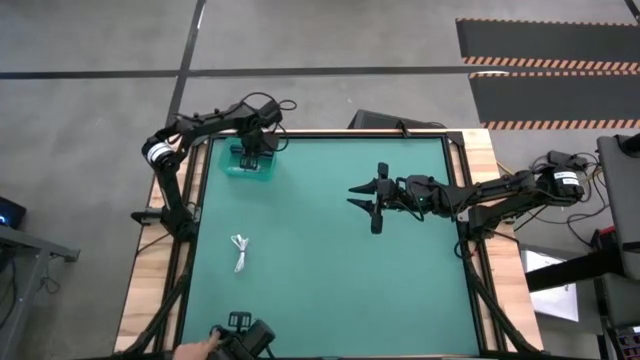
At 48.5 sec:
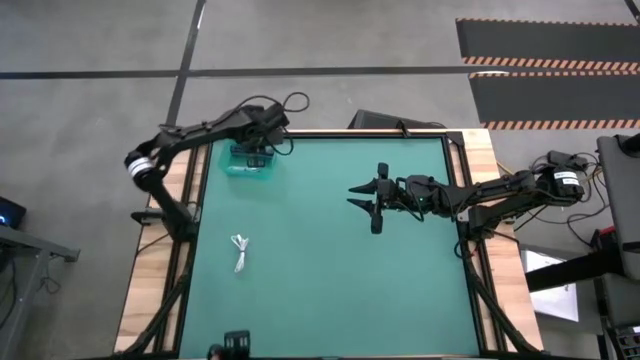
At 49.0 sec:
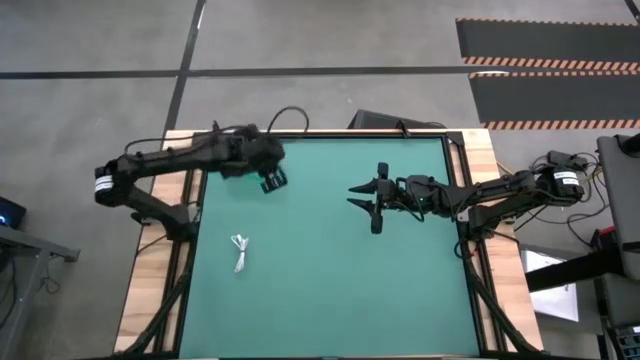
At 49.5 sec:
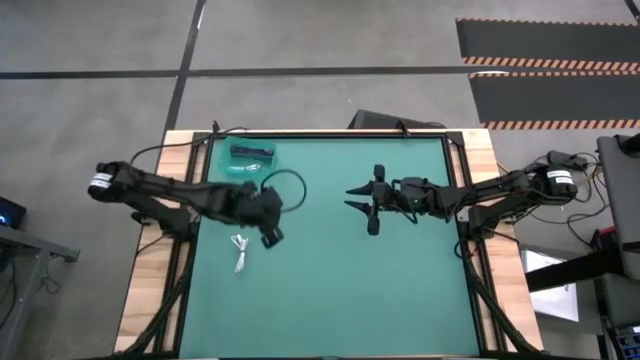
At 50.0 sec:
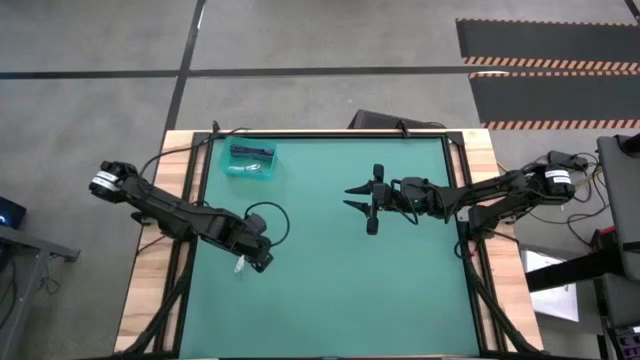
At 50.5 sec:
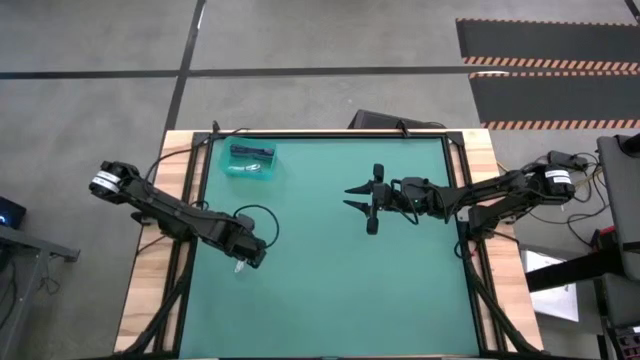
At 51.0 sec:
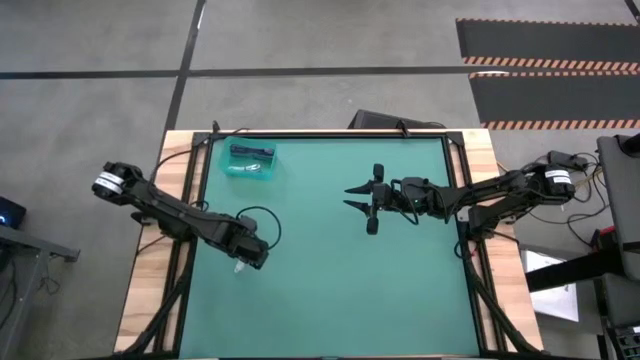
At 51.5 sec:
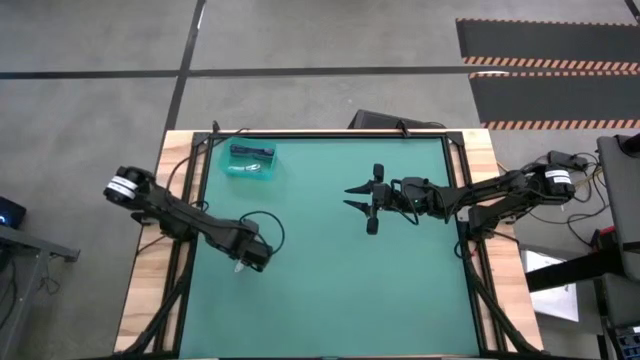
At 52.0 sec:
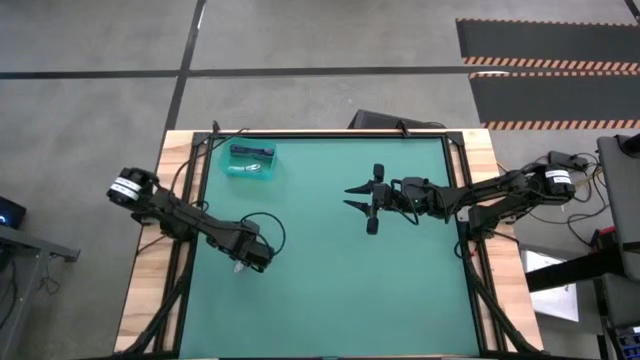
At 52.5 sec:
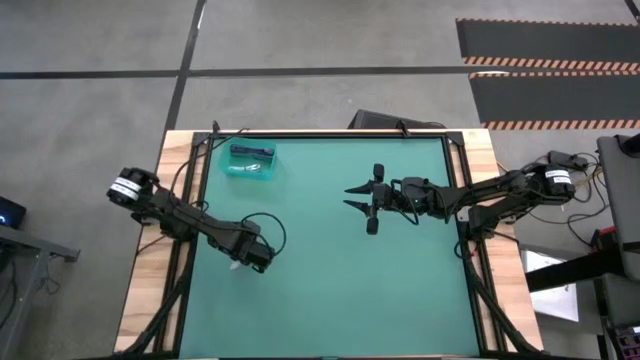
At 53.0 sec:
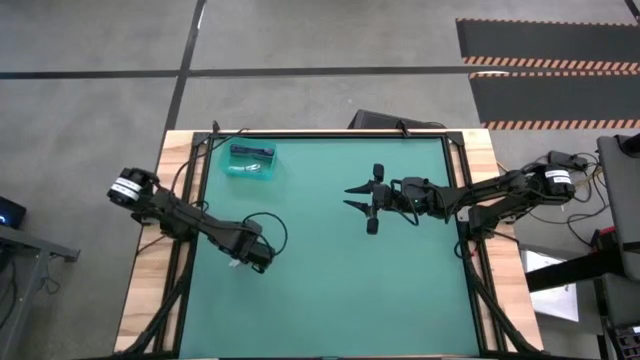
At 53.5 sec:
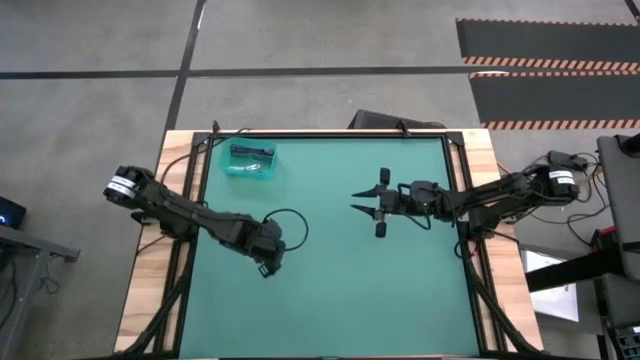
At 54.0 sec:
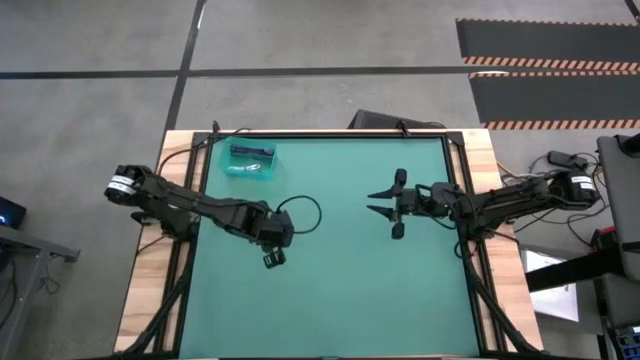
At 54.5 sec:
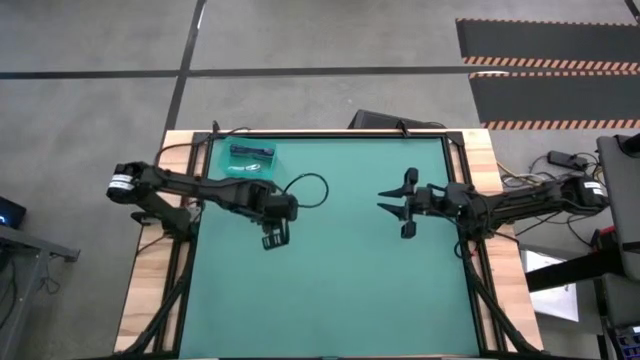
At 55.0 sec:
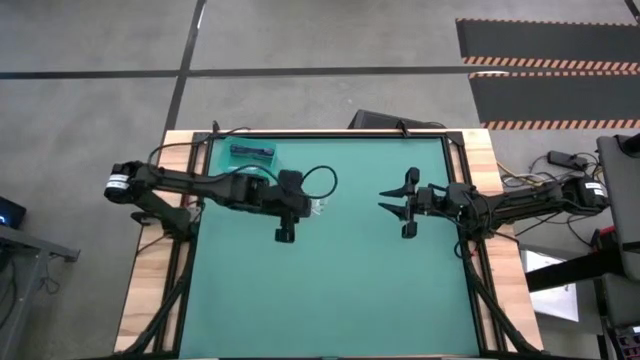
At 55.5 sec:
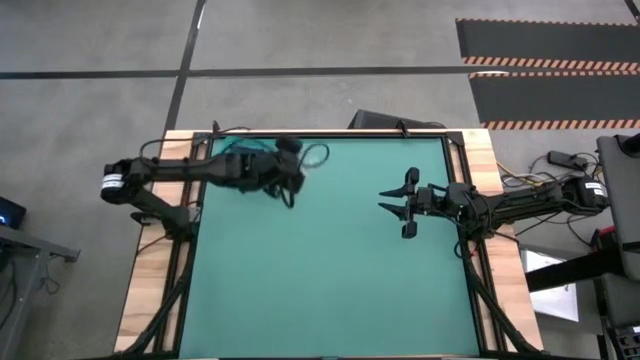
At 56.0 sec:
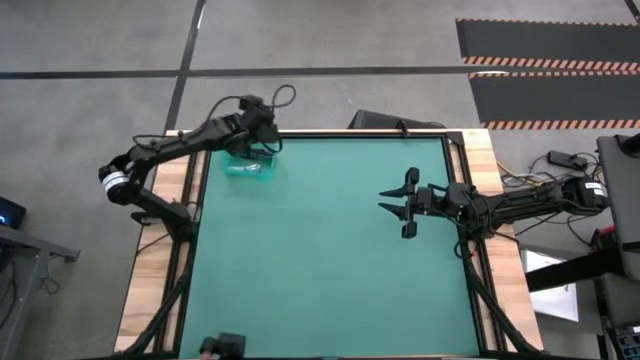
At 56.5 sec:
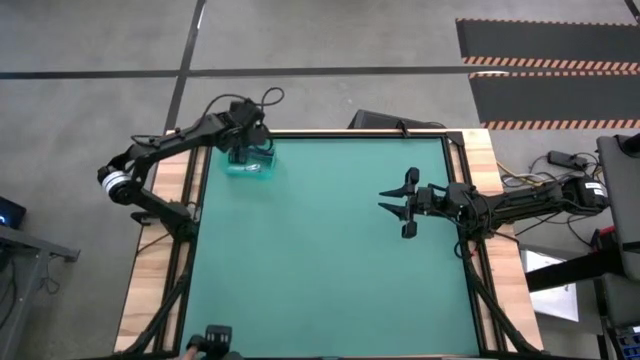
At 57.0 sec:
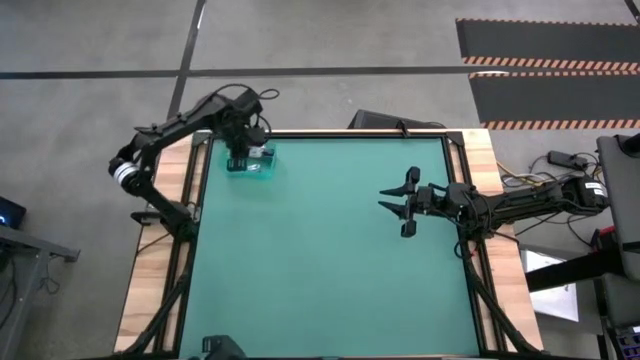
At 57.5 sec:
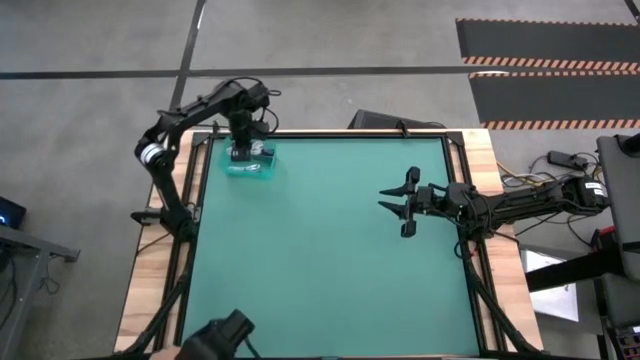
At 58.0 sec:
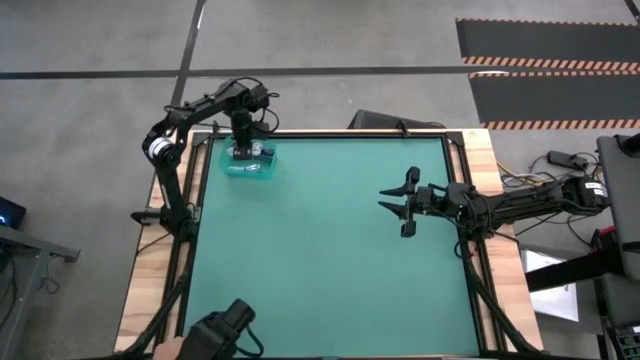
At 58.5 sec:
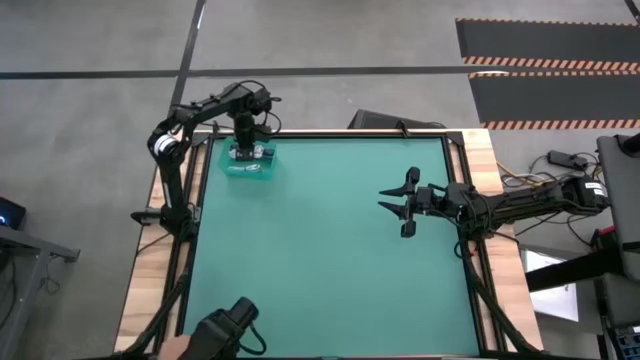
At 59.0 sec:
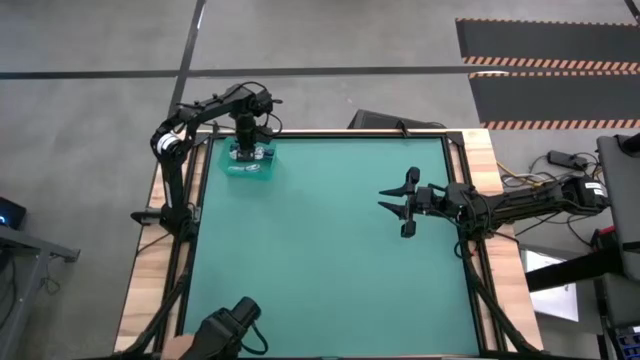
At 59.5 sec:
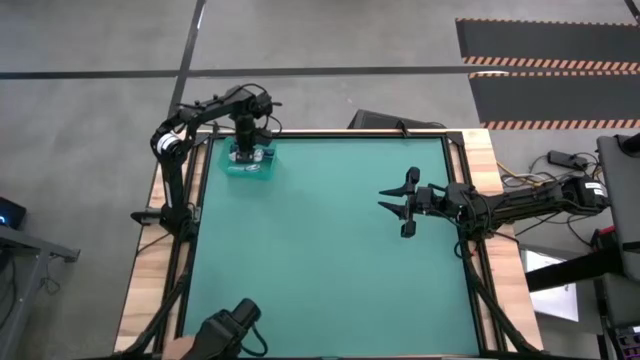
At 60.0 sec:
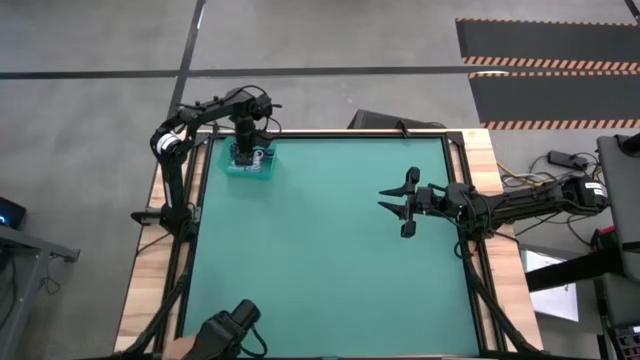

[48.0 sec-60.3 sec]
Task: Pick and place USB-C Cables
Put the white charger cable into the blue bin

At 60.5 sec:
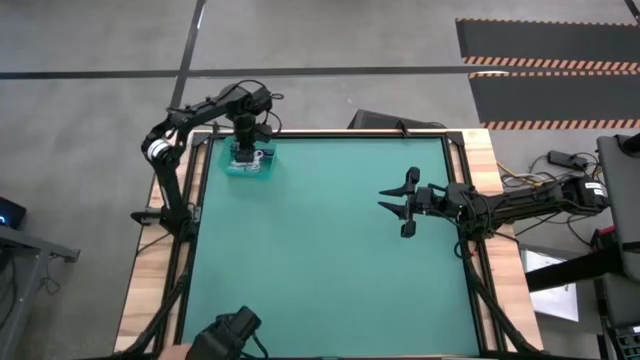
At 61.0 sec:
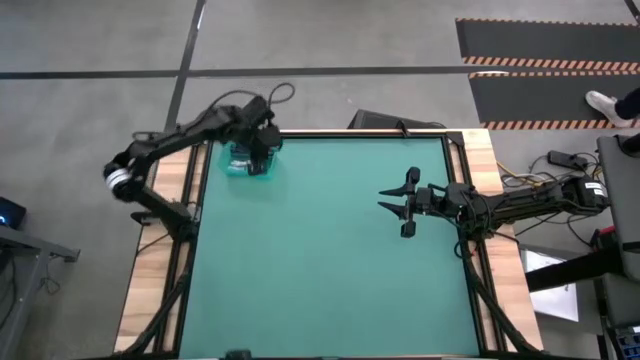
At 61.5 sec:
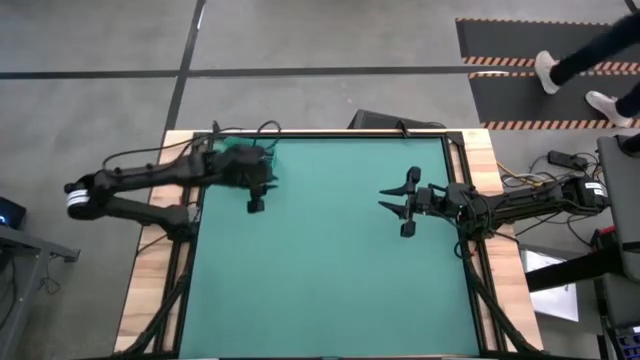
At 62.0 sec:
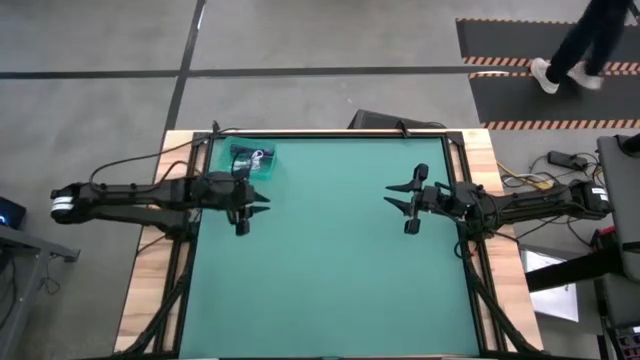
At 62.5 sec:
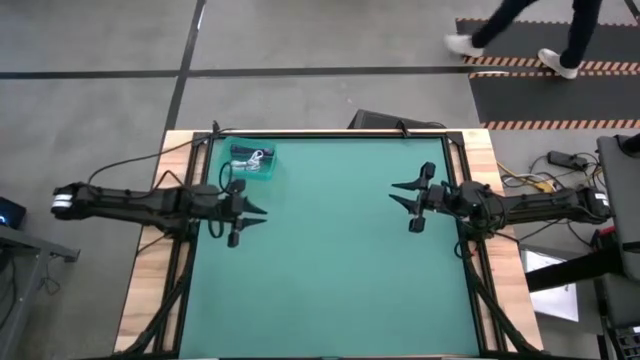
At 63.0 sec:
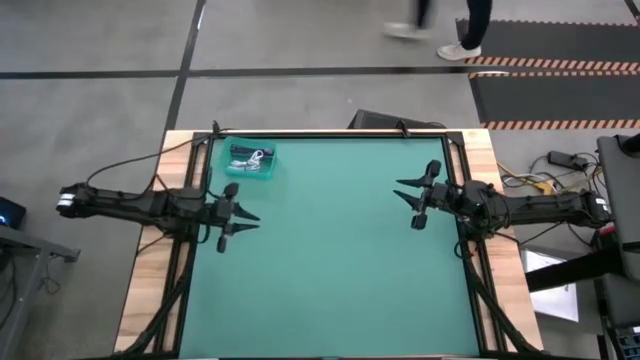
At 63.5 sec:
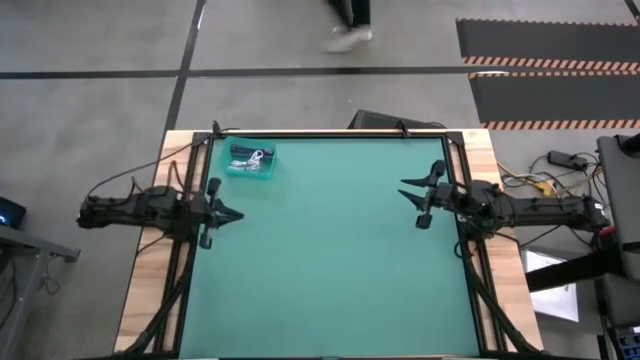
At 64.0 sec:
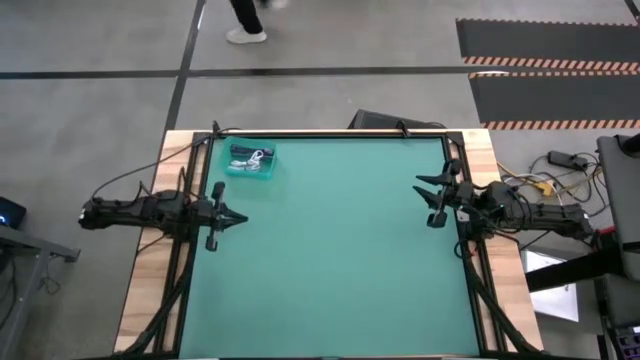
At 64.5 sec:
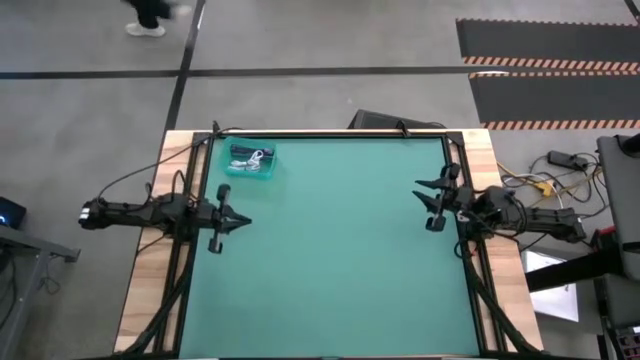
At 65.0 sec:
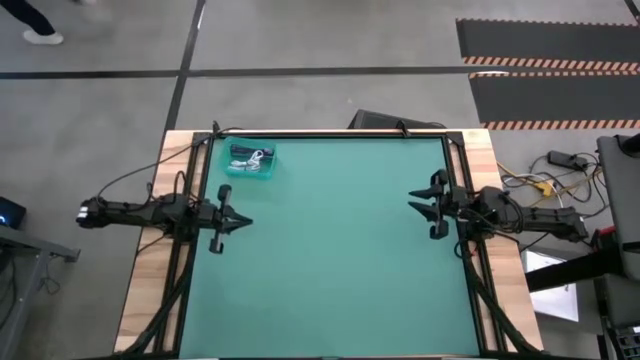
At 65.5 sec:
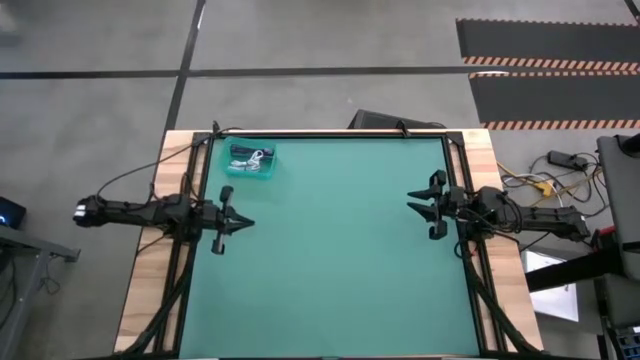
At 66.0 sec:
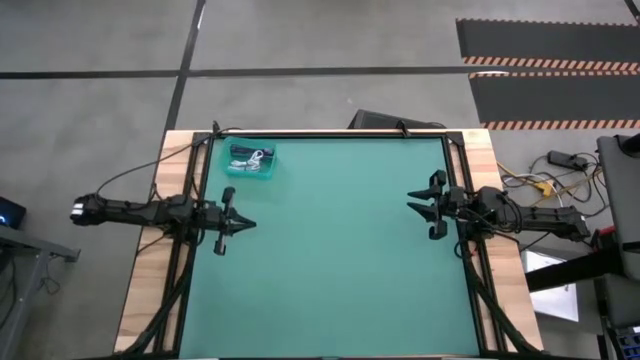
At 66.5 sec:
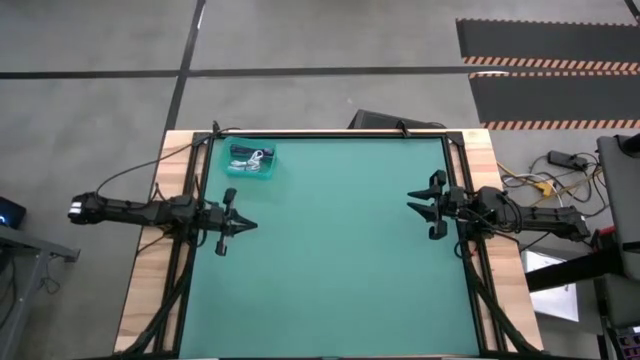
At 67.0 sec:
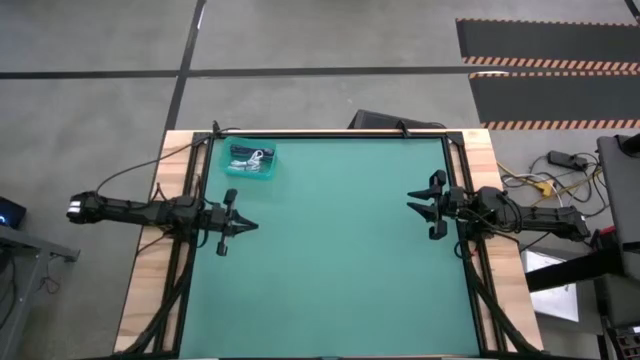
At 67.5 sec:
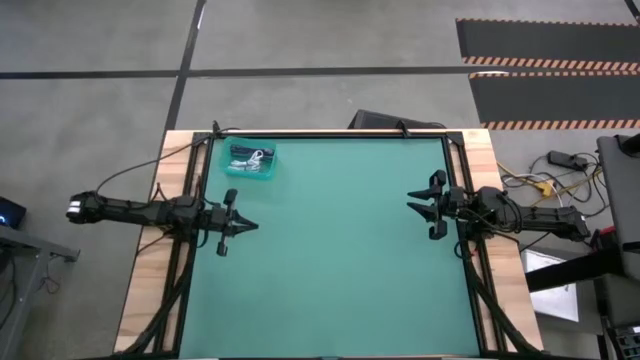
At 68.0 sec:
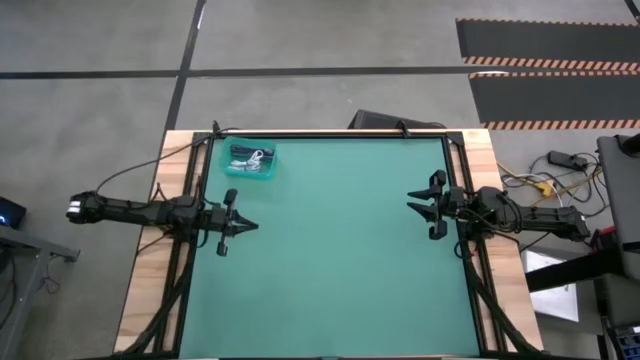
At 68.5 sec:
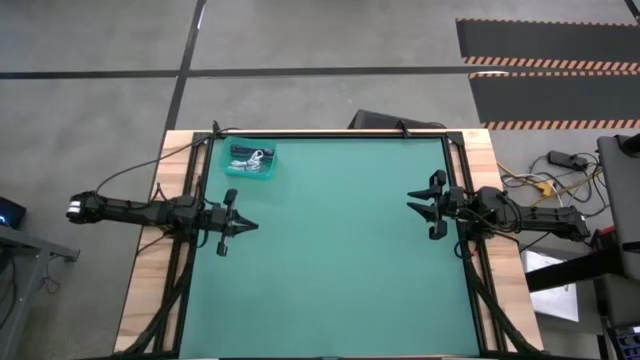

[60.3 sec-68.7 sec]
Return to Home Position

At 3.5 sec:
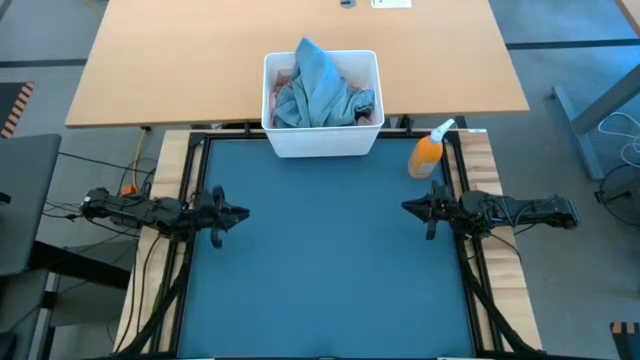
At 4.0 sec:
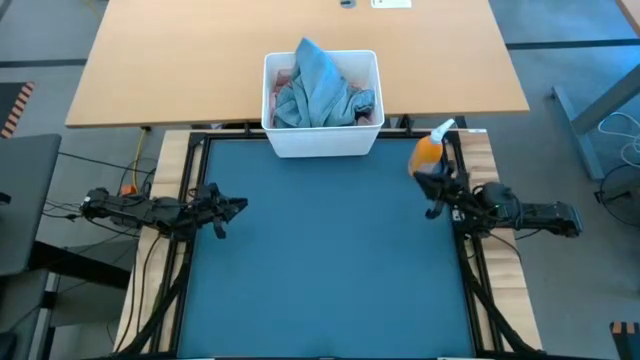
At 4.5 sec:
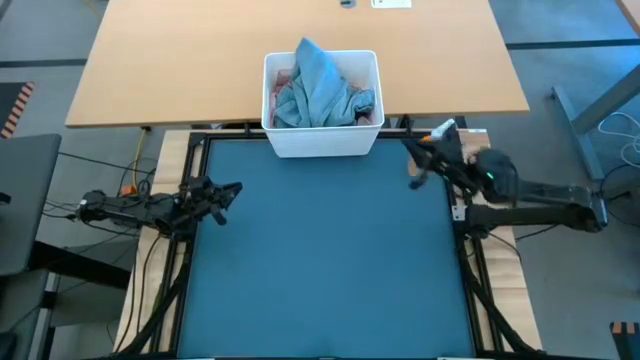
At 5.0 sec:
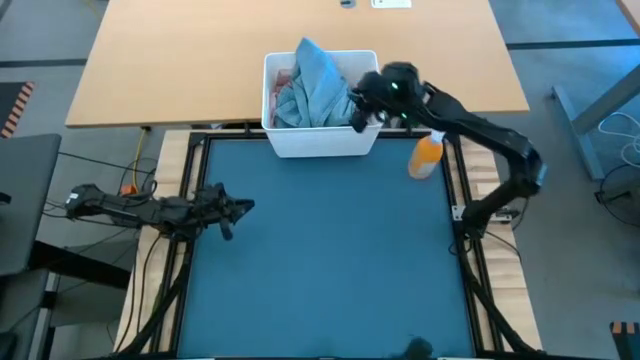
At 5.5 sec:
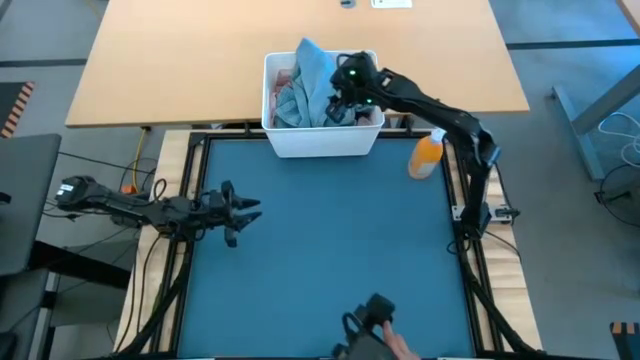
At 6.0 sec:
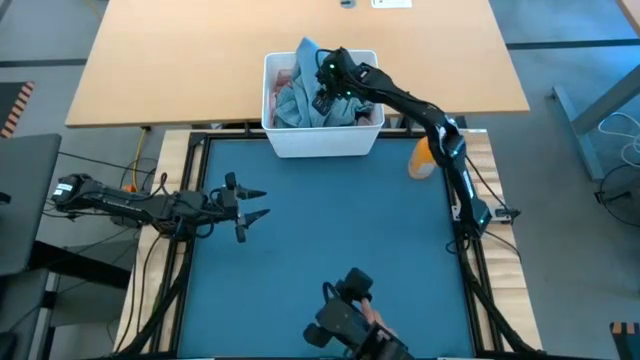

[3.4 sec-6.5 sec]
Task: Fold Laundry from Bin
Fold the blue pants
